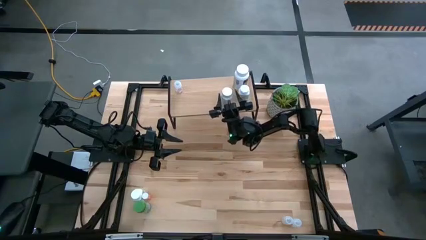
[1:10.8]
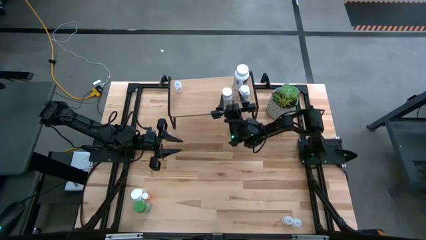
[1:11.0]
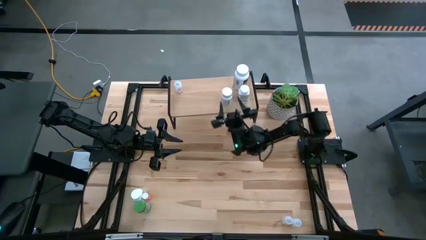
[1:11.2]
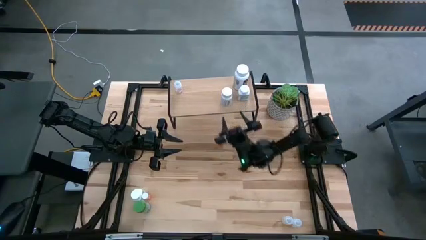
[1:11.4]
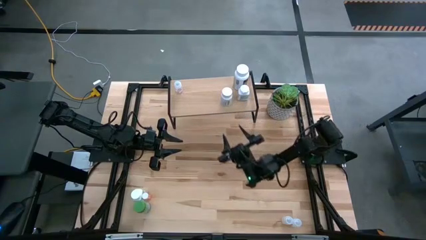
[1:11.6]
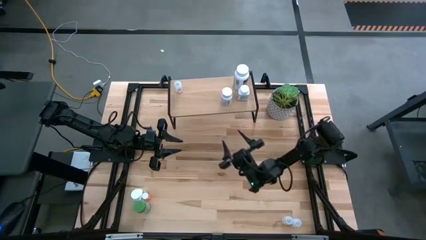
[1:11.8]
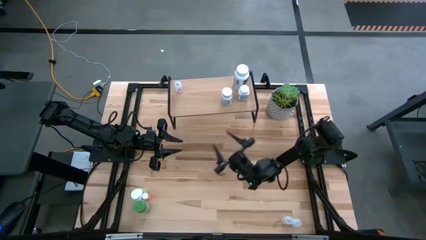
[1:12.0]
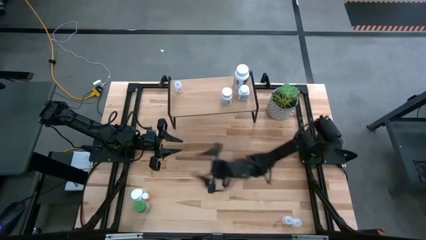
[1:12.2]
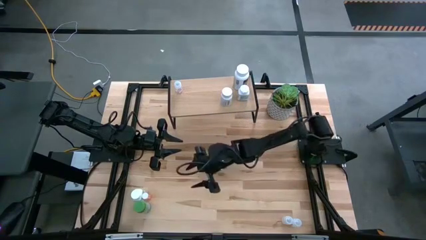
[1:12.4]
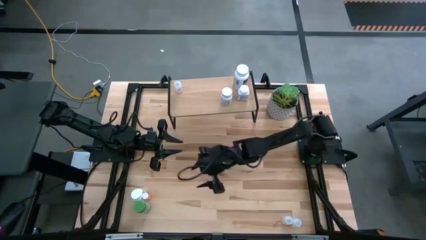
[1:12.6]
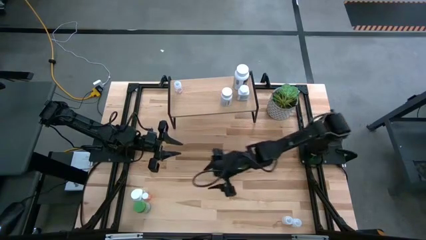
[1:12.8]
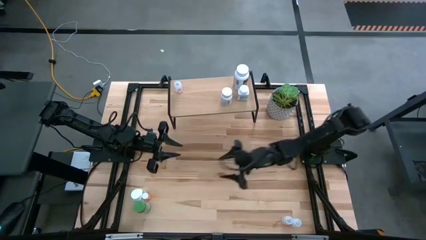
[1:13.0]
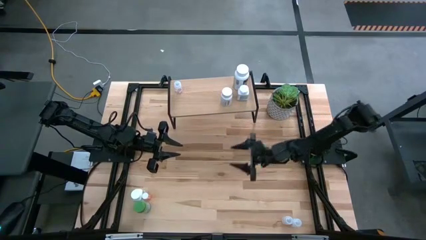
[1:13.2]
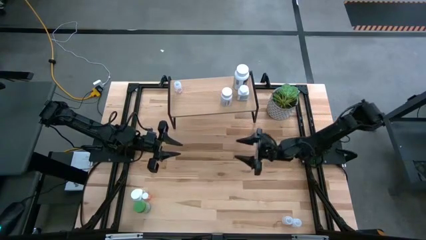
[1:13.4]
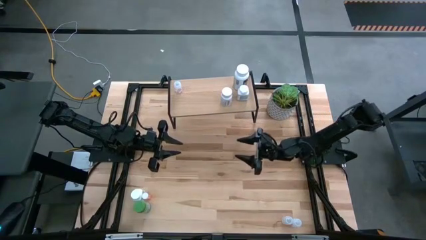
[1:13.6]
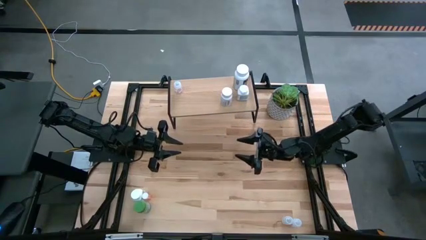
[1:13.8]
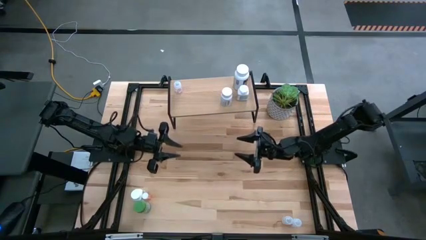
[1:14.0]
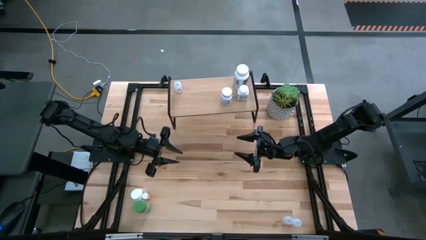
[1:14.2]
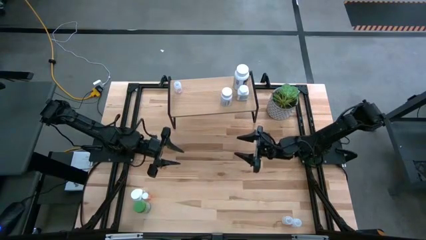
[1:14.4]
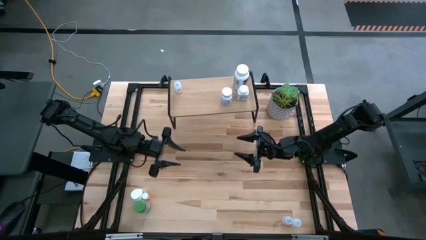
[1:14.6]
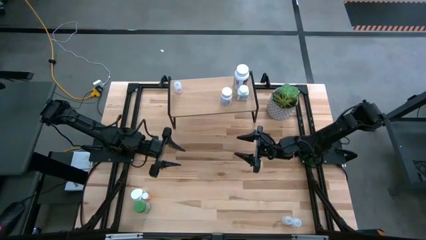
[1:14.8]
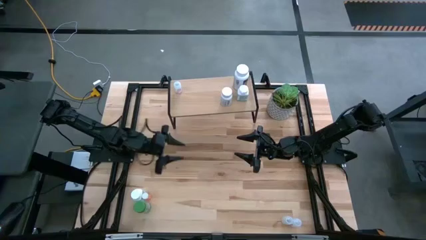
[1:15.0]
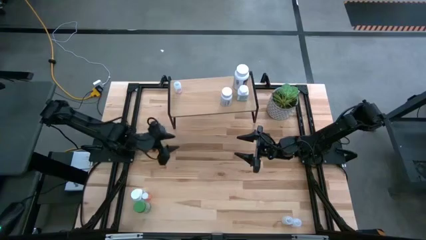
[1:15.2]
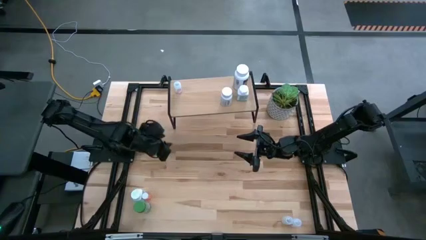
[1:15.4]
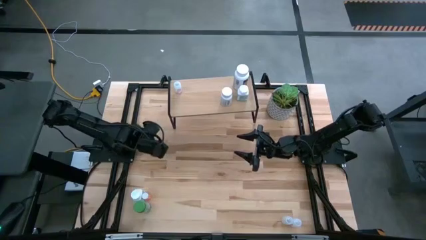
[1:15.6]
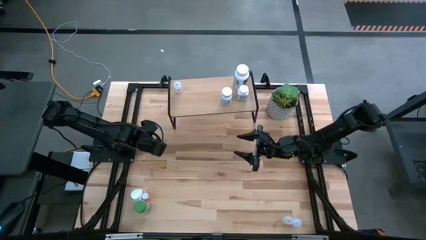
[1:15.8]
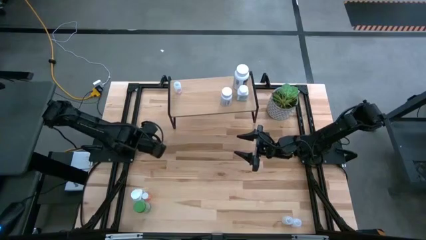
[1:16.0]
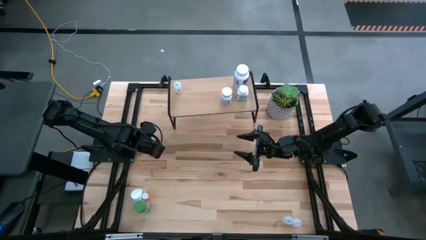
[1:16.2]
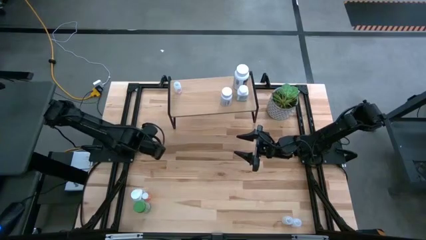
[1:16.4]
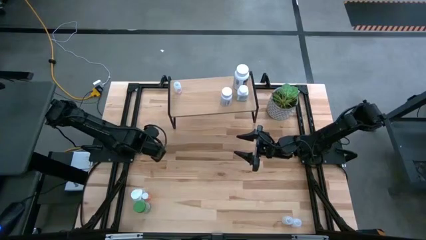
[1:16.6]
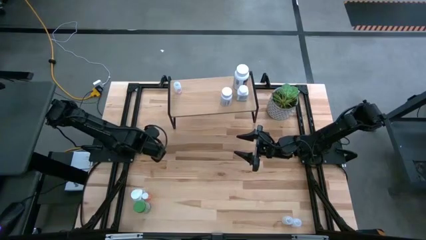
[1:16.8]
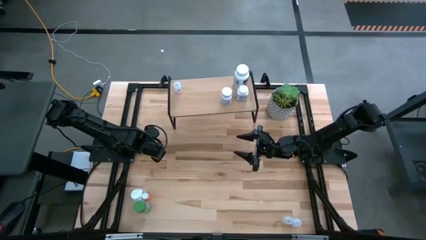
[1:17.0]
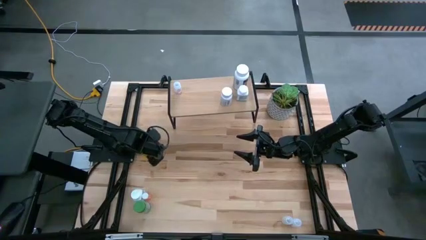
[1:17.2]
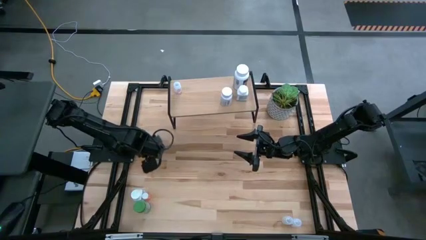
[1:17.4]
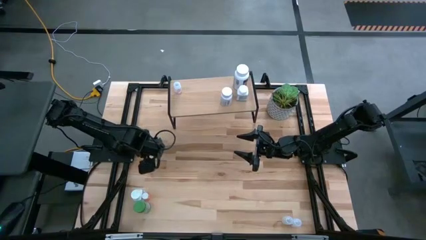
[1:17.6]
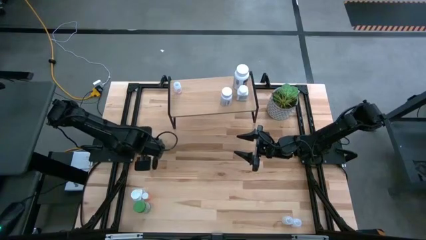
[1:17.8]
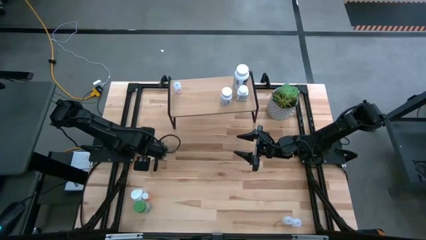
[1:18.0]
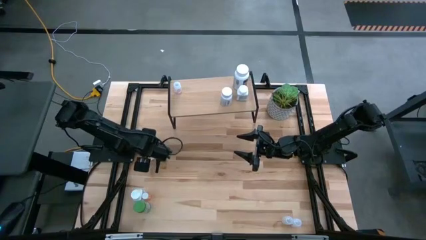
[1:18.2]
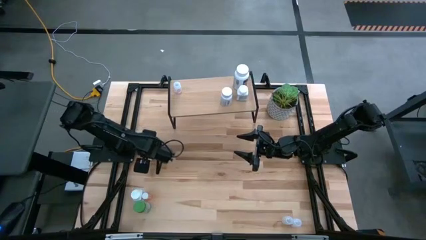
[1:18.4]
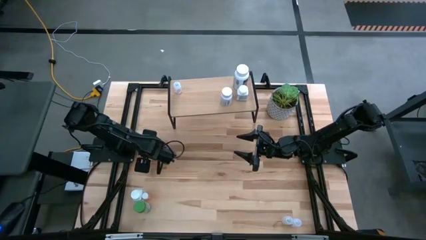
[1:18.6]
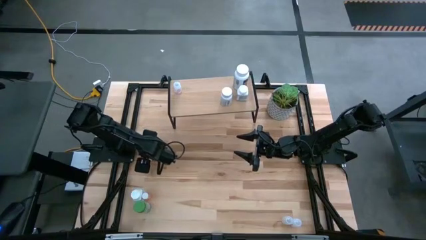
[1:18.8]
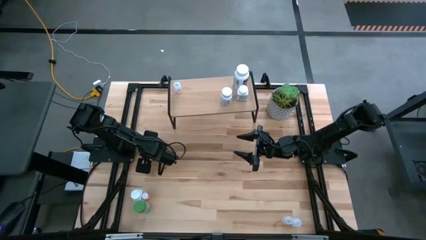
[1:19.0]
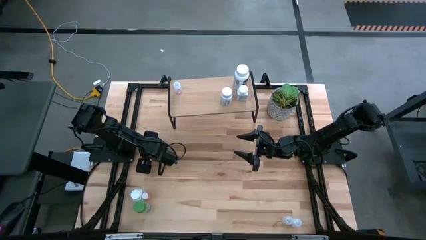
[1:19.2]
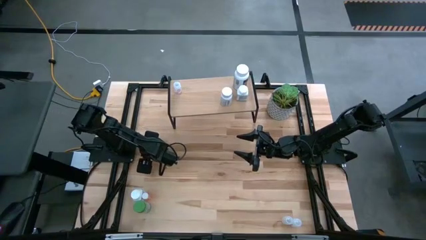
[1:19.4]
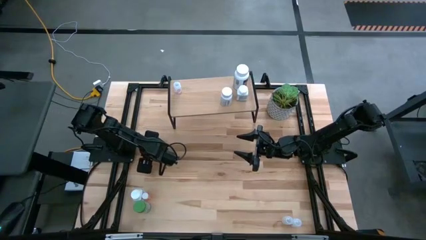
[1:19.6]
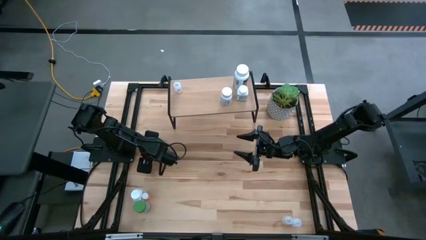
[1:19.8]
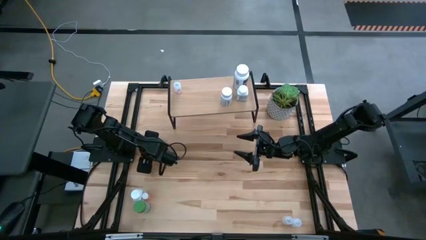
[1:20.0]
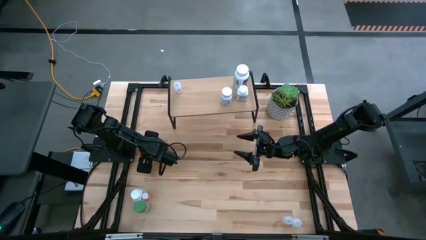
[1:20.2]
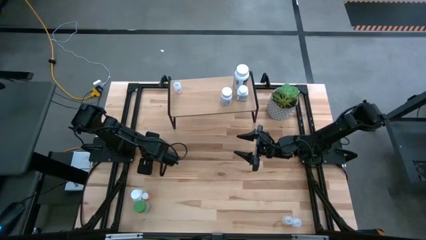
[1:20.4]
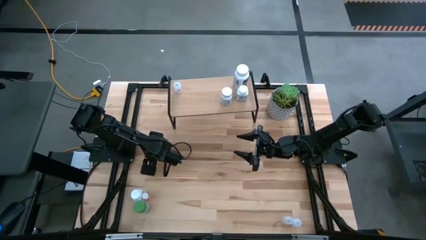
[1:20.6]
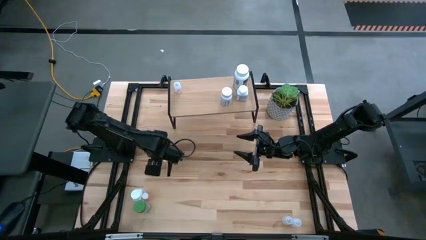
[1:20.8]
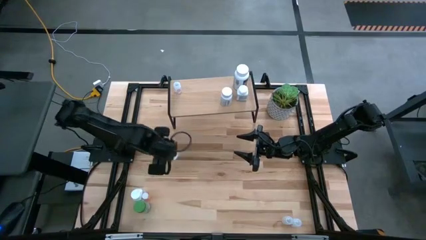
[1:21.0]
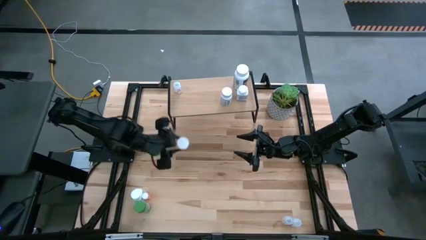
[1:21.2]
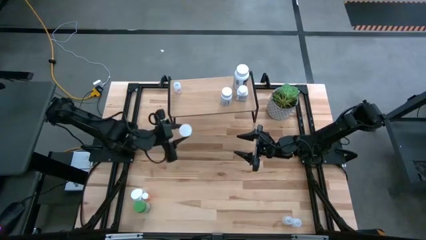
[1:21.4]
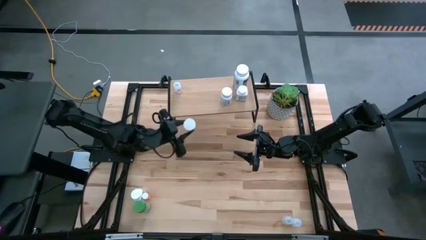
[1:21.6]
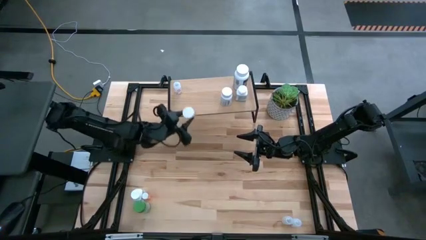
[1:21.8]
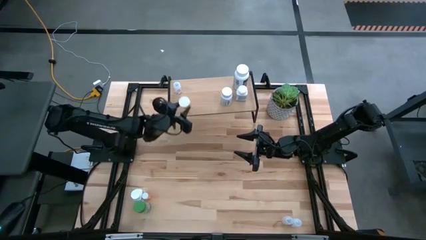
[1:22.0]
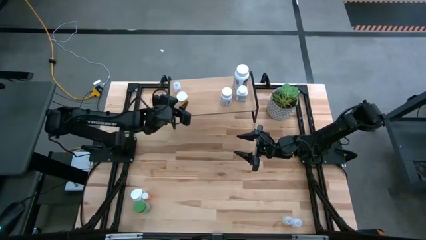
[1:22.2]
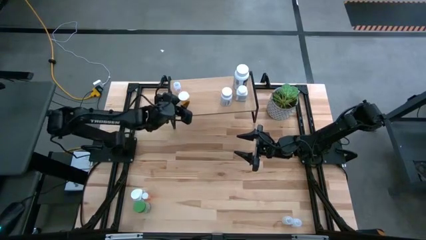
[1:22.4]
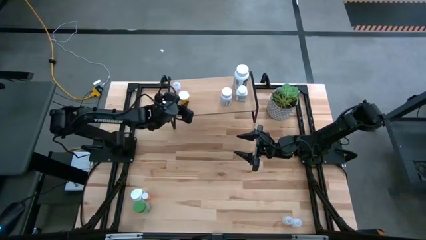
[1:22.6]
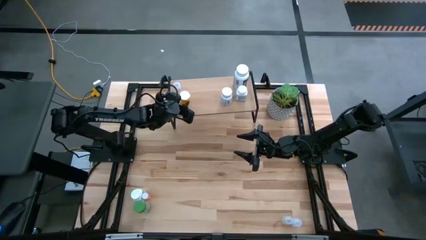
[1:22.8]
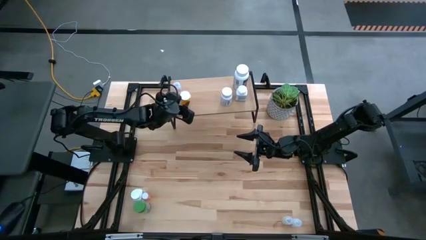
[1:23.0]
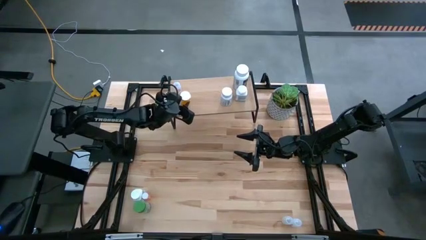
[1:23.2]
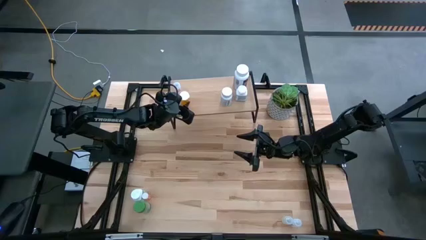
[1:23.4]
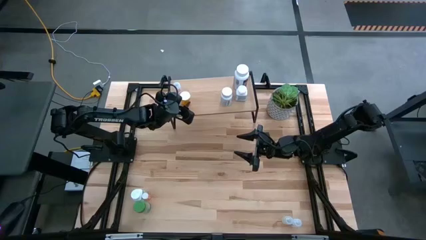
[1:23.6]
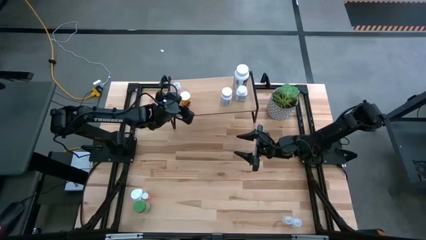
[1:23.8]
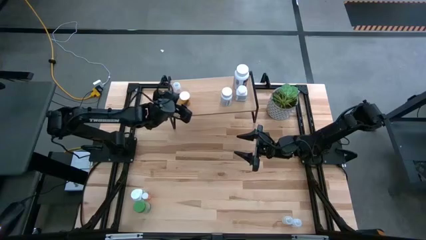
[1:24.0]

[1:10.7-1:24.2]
Task: Pick and place medicine bottles onto shelf by color
Put the orange pill bottle on the shelf
